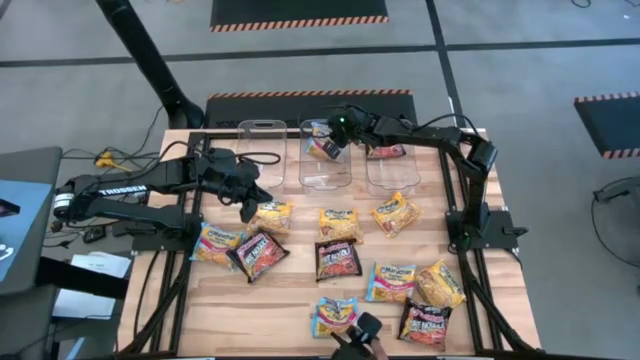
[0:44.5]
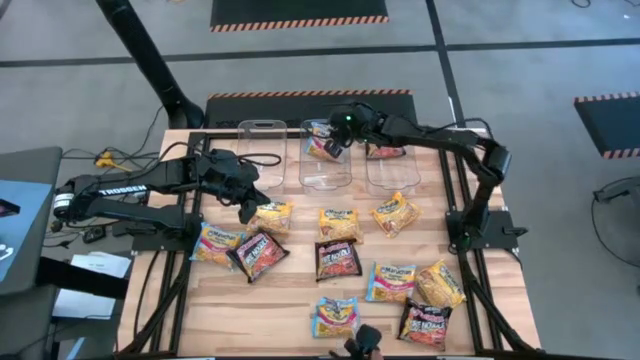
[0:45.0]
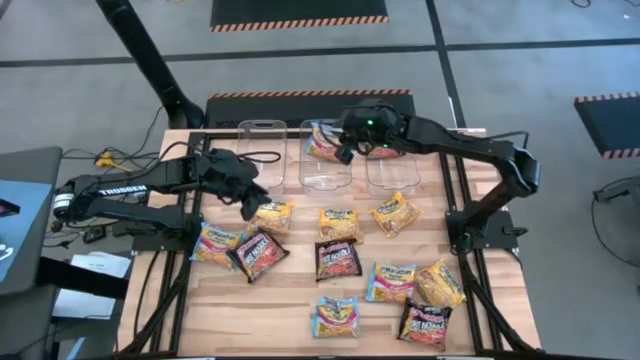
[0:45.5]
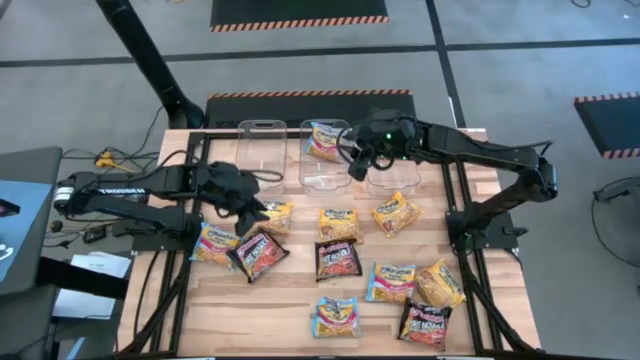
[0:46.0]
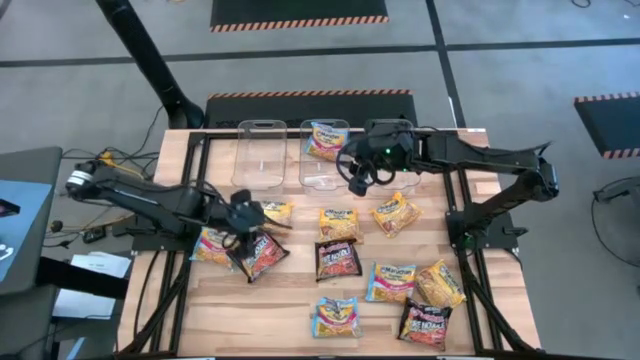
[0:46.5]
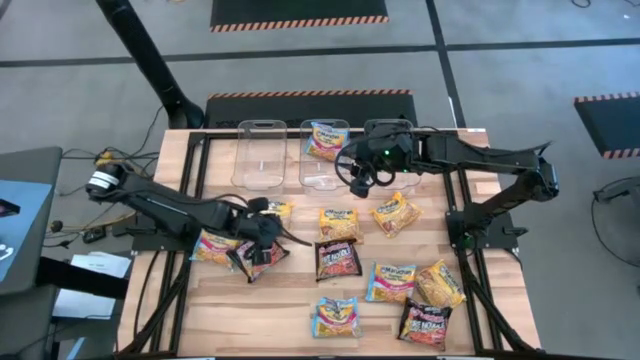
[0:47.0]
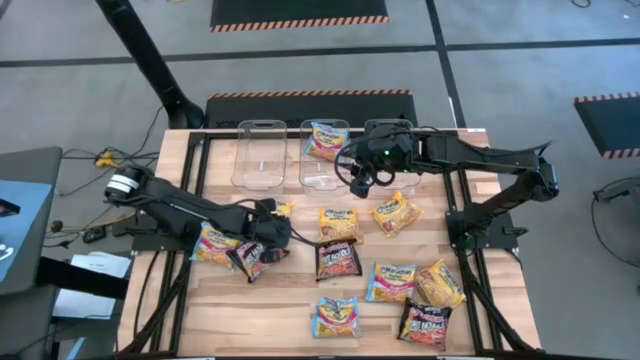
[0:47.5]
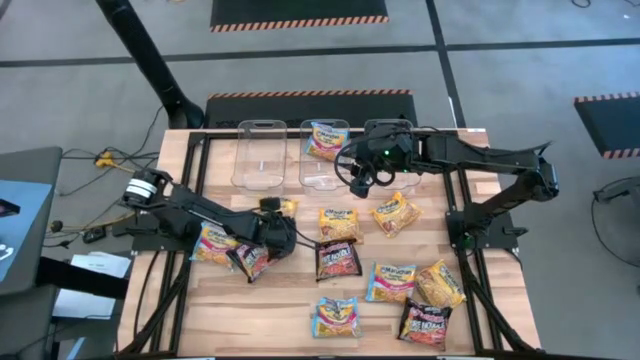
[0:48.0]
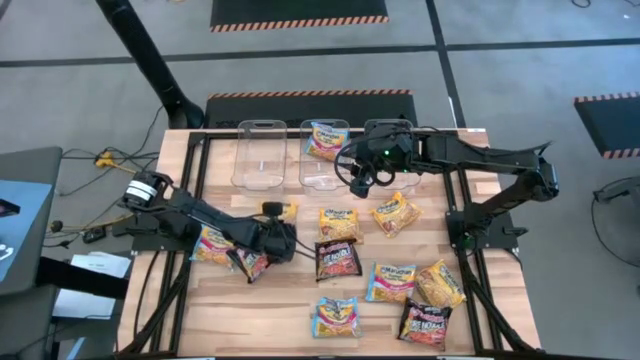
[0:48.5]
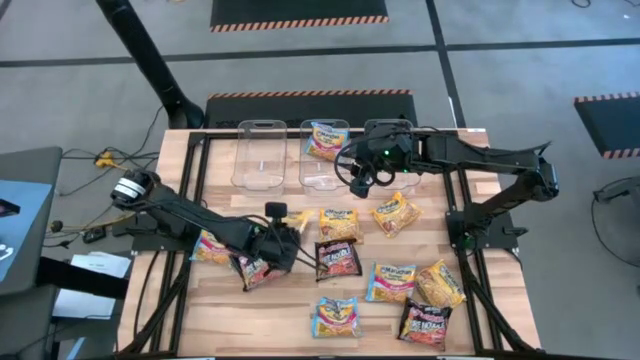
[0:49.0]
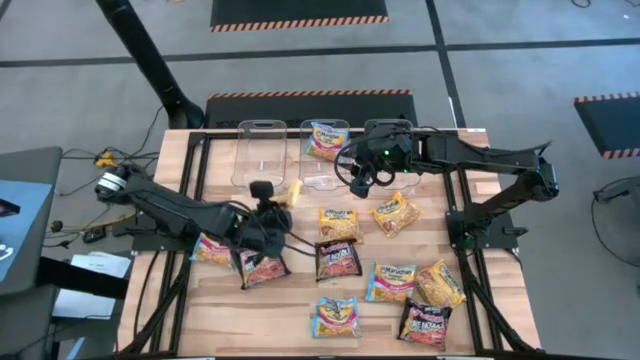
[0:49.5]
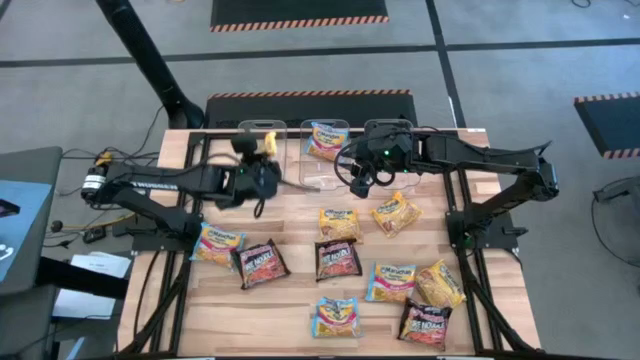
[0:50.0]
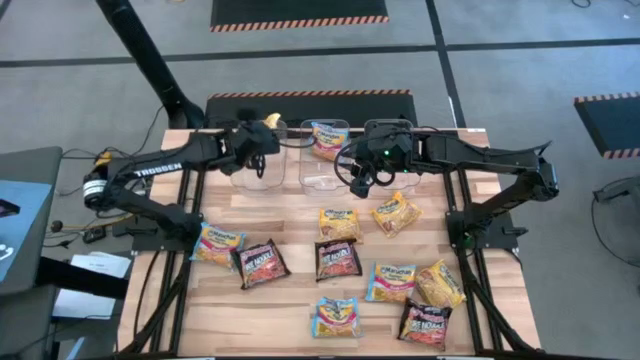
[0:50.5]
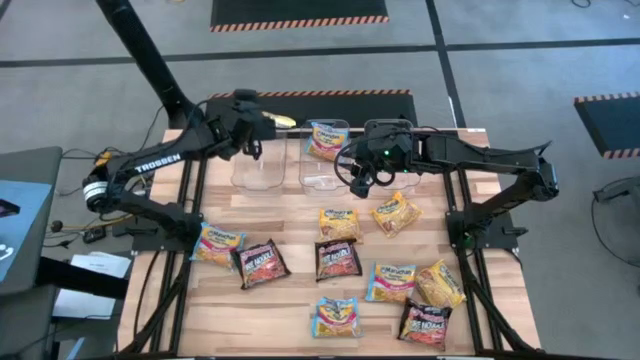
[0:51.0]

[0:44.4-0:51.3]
Task: Sort Maruchan noodles
Put the yellow noodle pack into the left transparent bin

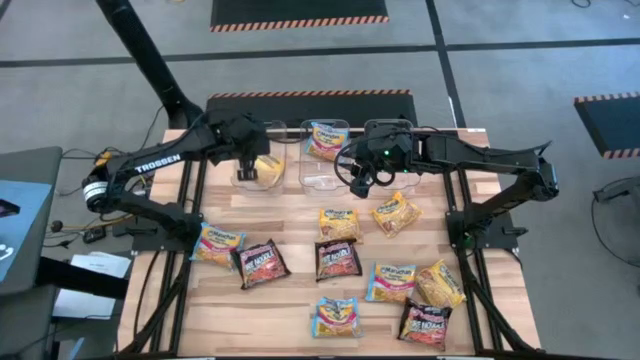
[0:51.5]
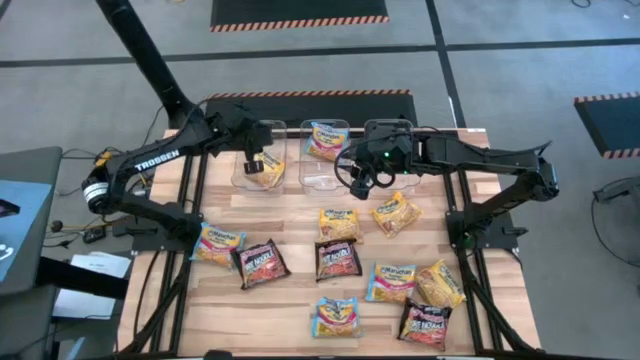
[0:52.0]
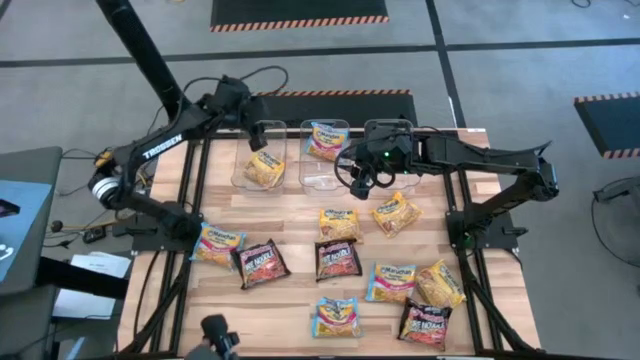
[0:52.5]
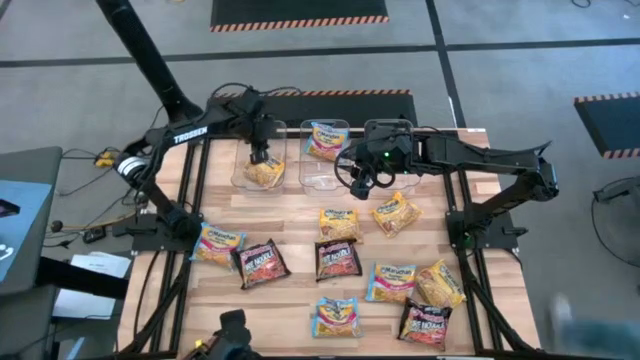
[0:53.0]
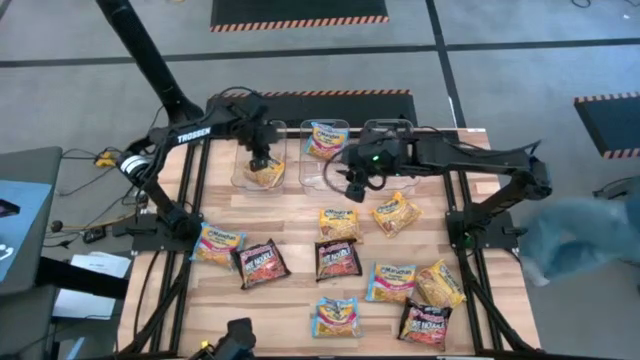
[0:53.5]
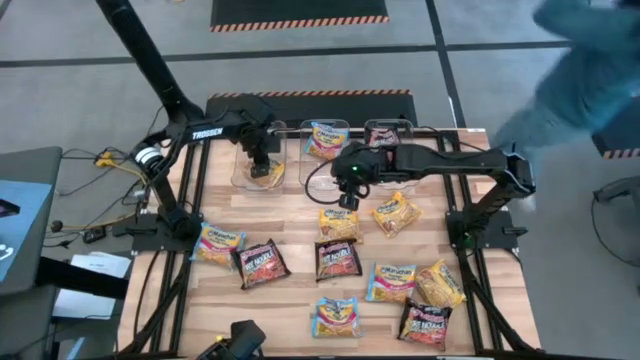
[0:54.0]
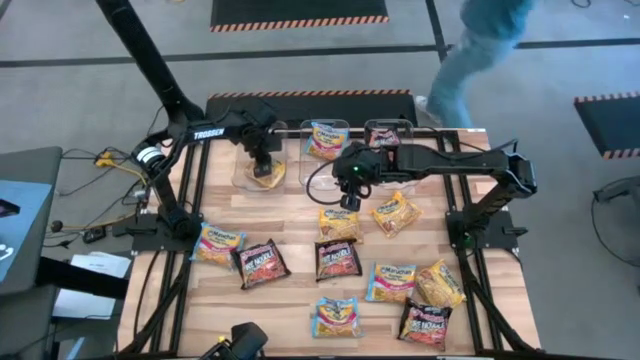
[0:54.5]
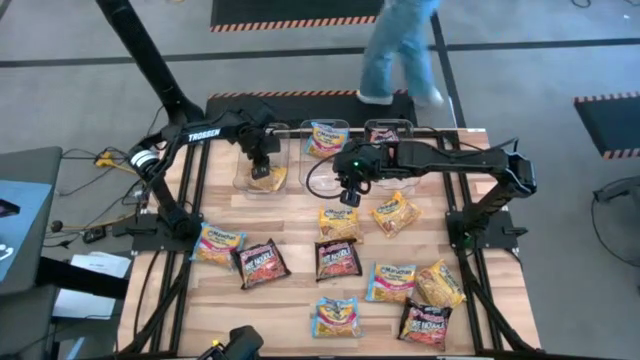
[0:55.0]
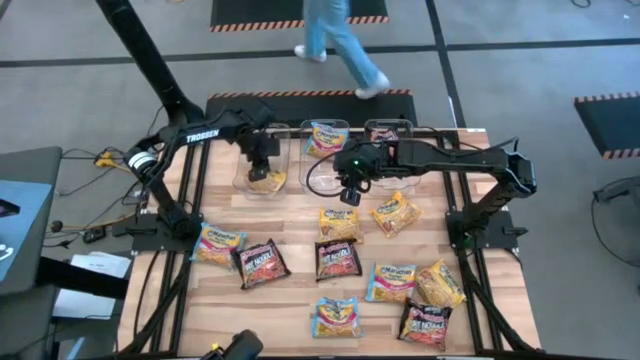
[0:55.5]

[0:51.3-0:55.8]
Put the yellow noodle pack into the left transparent bin

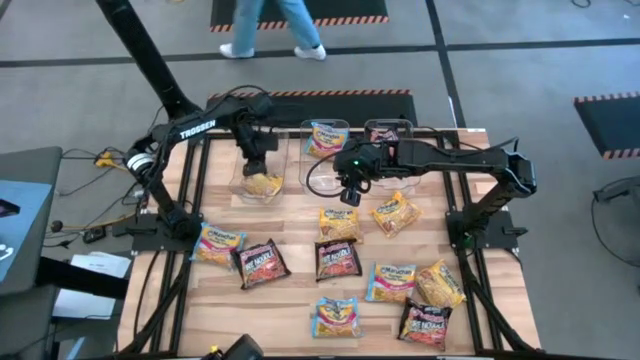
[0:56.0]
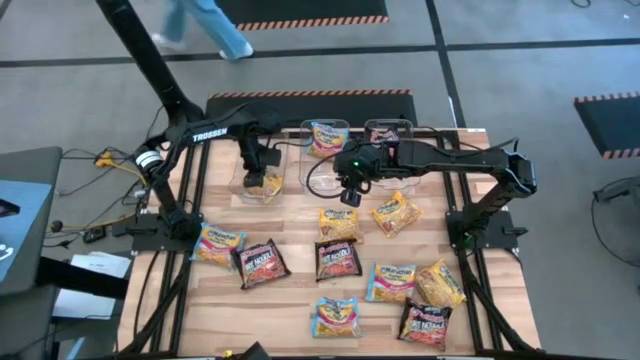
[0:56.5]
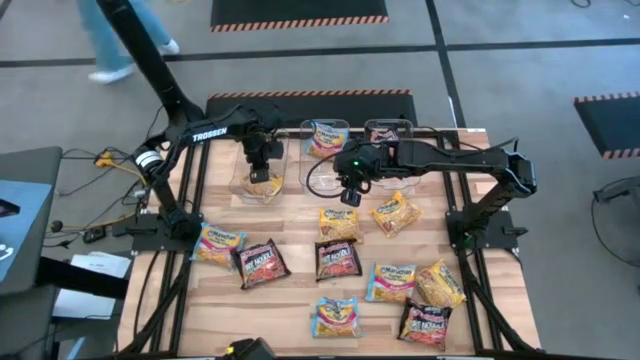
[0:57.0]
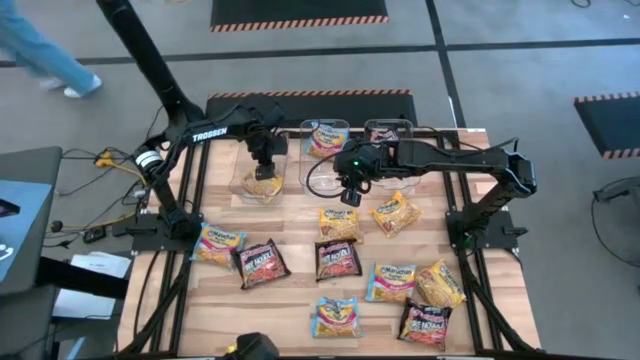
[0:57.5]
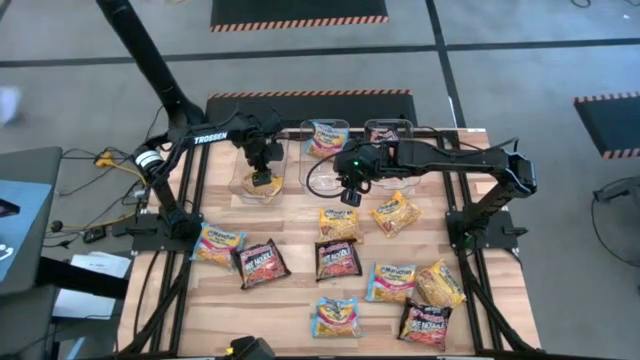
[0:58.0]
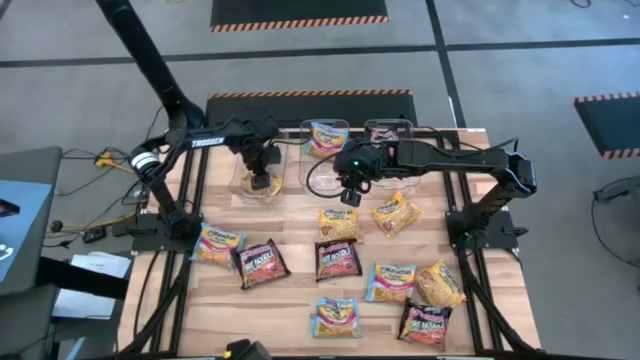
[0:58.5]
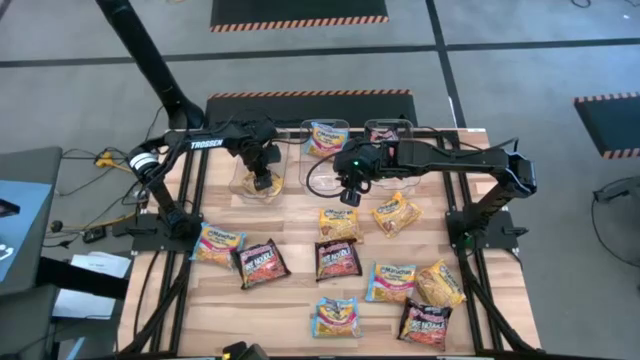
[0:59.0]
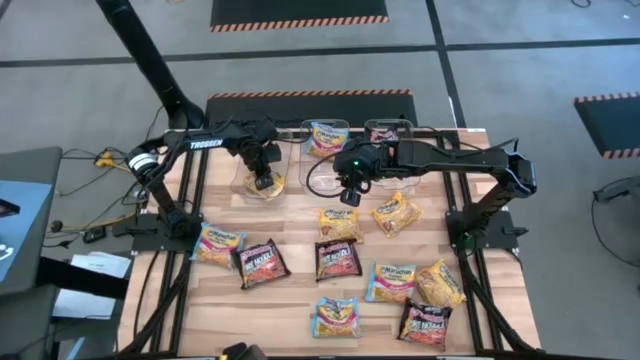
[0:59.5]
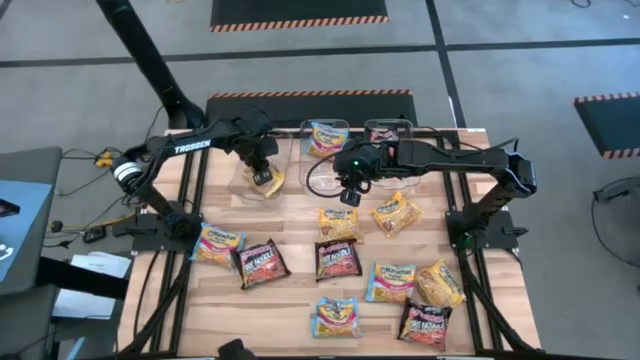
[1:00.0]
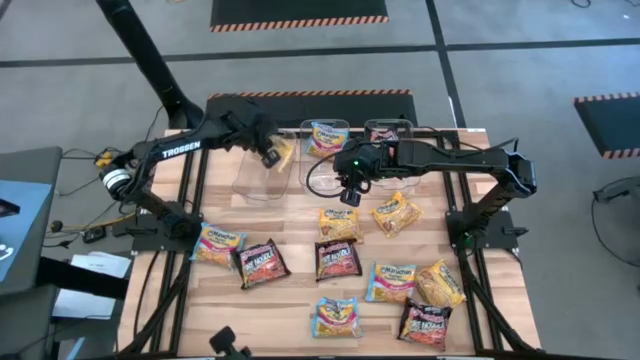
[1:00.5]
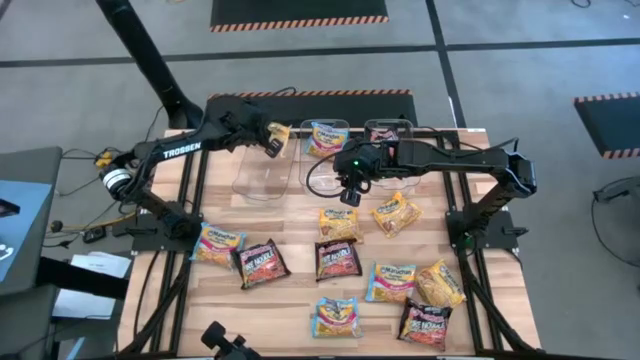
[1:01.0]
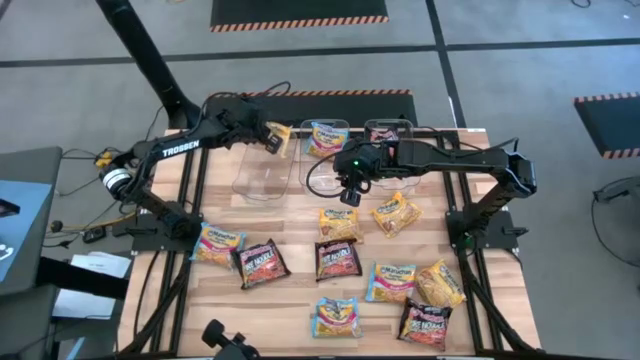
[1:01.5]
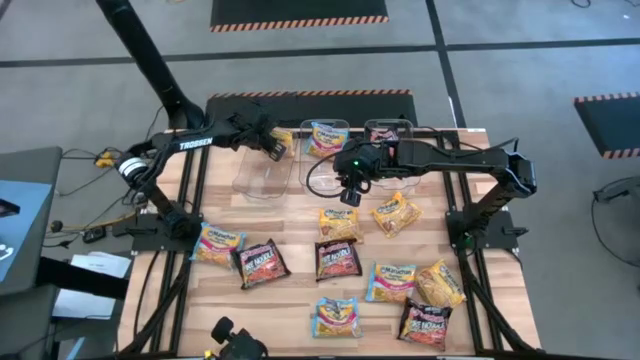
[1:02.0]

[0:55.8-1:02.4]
Put the yellow noodle pack into the left transparent bin

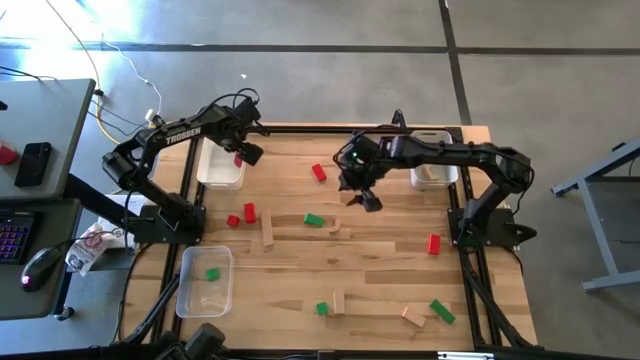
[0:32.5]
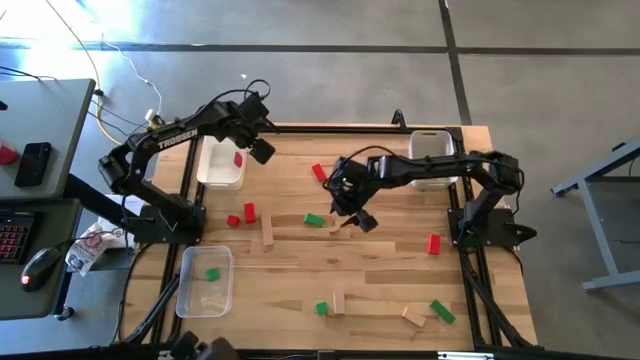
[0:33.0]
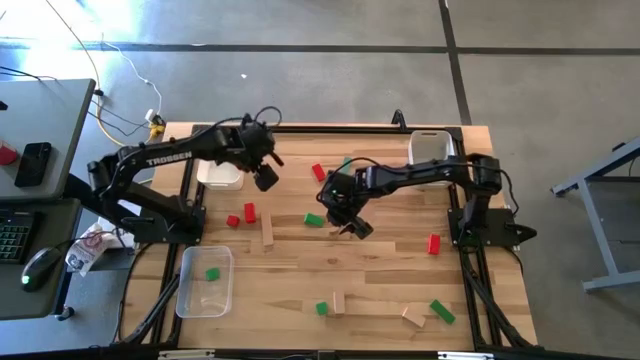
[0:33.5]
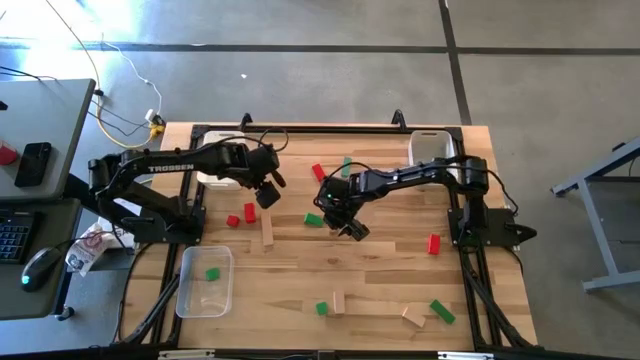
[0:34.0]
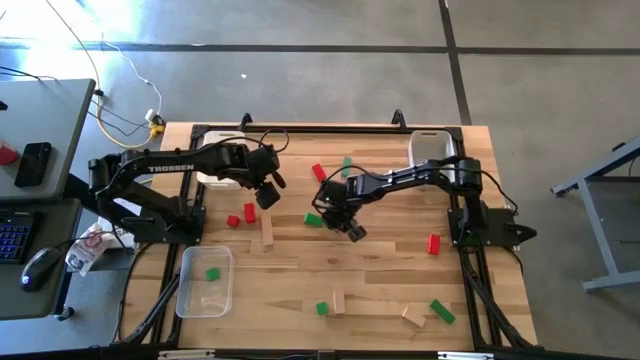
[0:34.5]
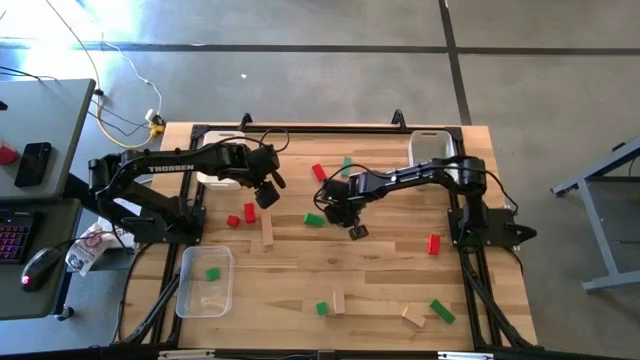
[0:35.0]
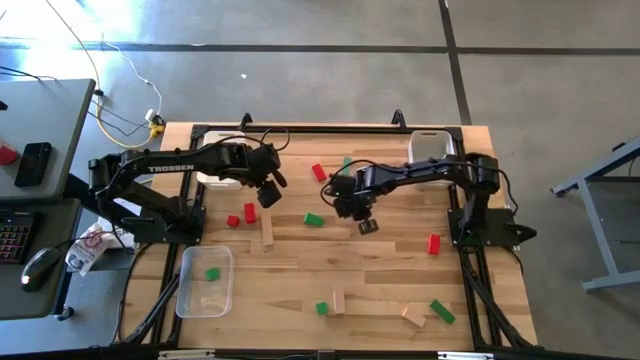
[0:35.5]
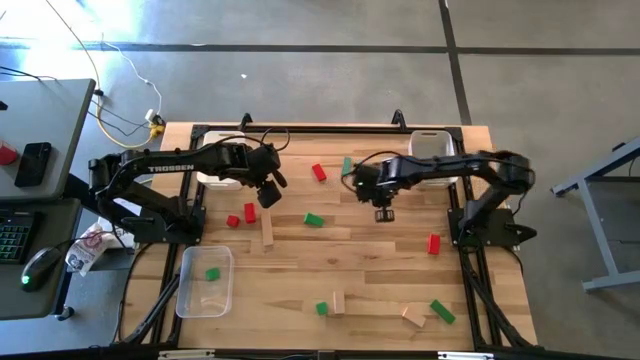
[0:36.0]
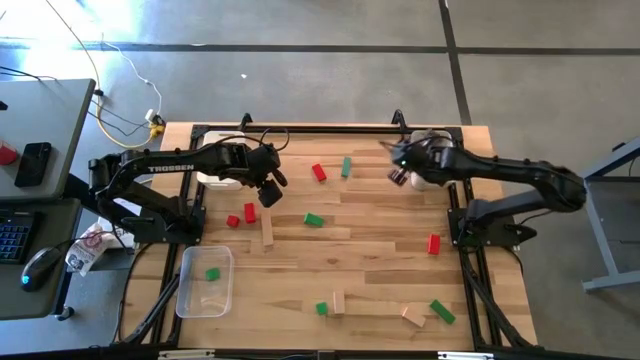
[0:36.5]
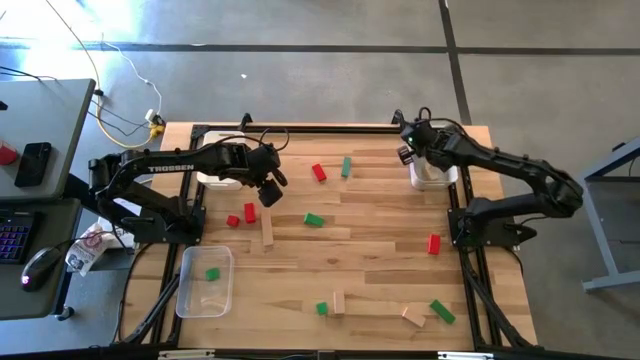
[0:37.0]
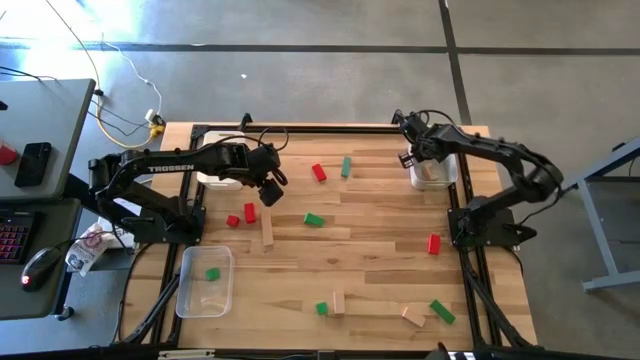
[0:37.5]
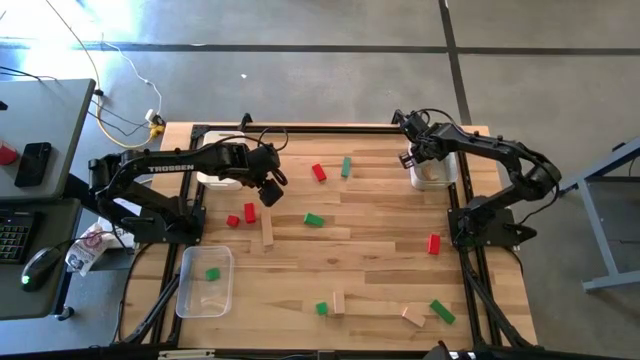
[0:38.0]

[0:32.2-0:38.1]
Task: Sort & place blocks by color
Put the light brown block into the gray bin
